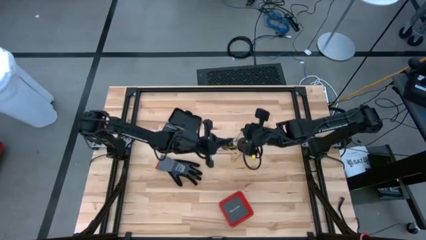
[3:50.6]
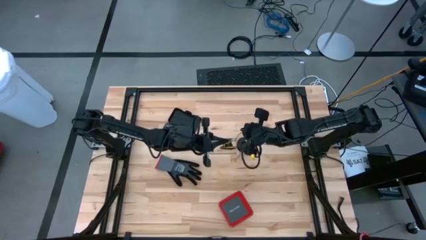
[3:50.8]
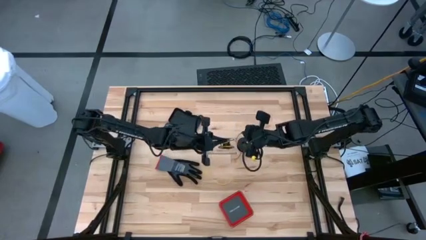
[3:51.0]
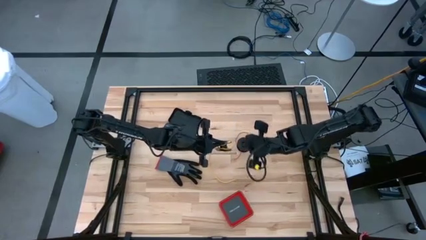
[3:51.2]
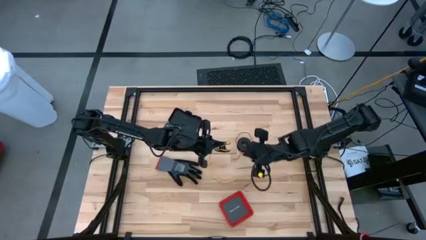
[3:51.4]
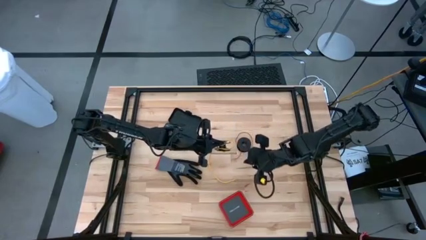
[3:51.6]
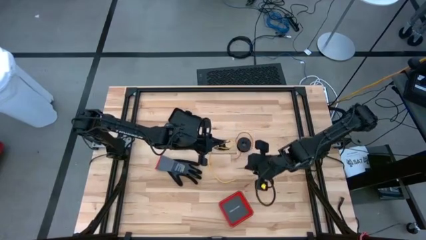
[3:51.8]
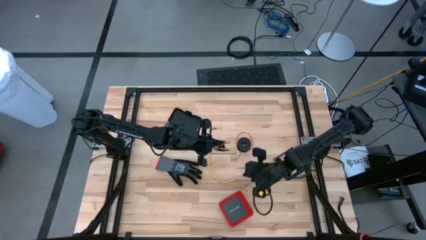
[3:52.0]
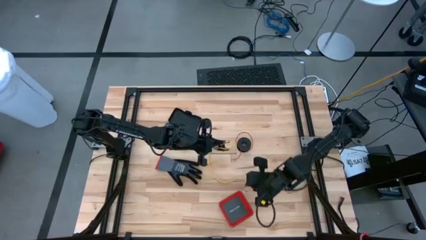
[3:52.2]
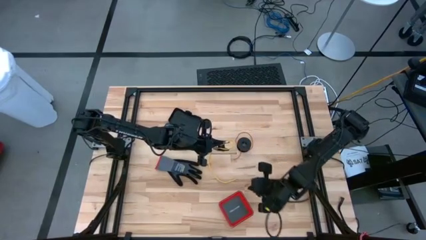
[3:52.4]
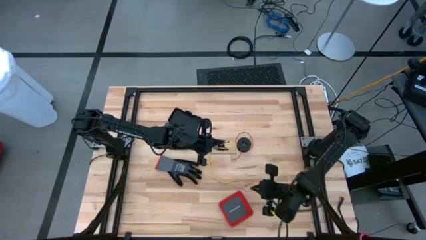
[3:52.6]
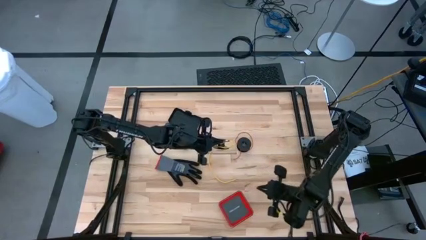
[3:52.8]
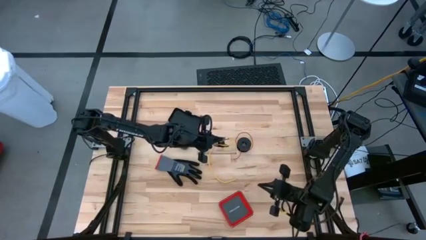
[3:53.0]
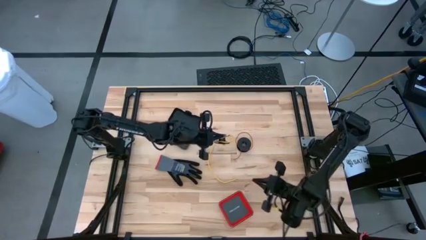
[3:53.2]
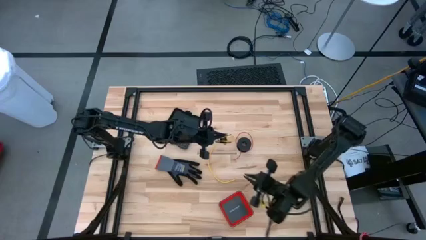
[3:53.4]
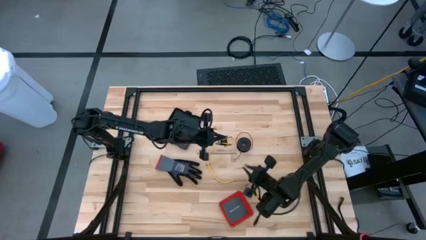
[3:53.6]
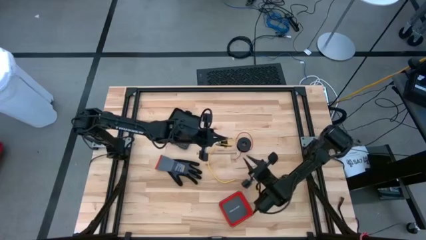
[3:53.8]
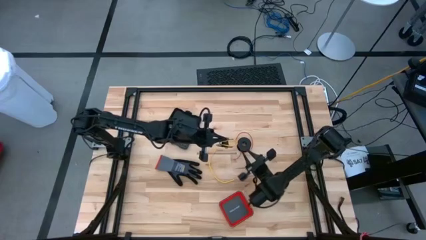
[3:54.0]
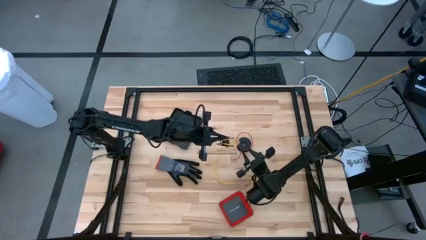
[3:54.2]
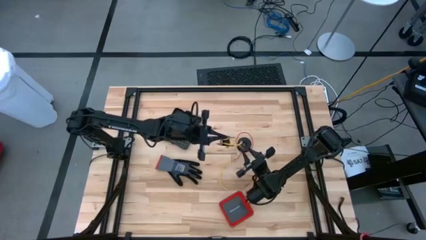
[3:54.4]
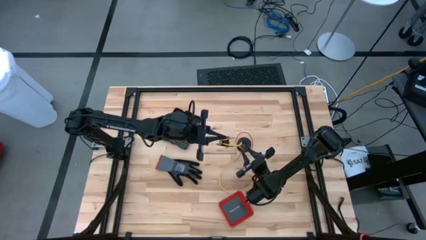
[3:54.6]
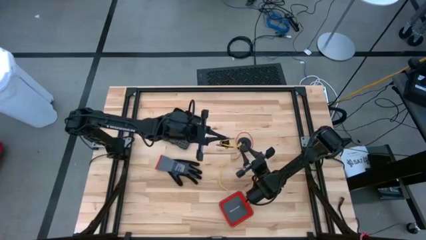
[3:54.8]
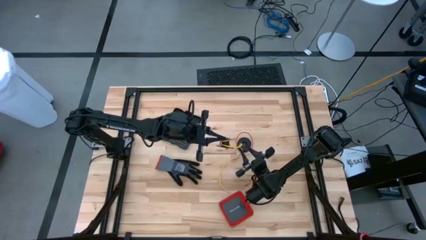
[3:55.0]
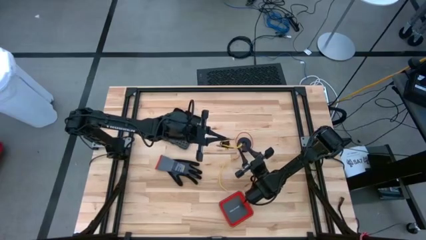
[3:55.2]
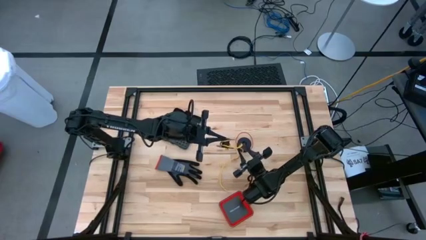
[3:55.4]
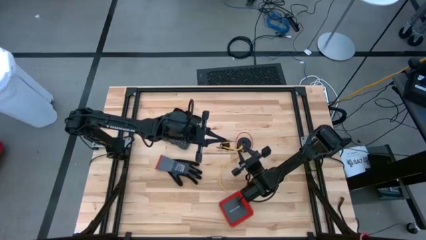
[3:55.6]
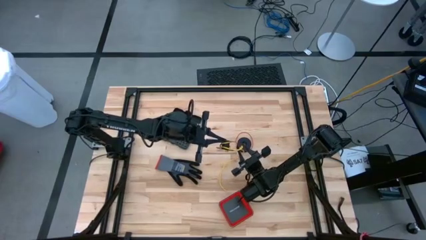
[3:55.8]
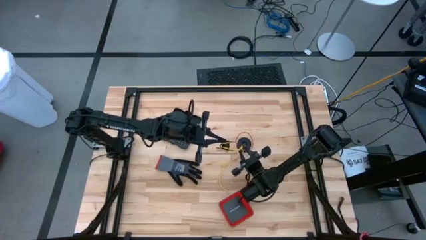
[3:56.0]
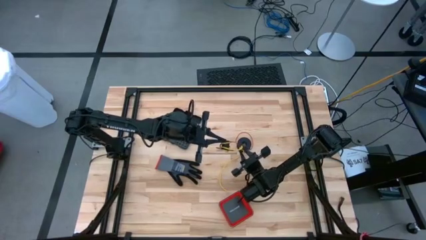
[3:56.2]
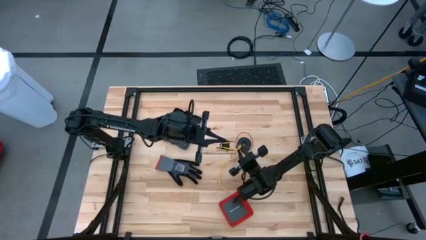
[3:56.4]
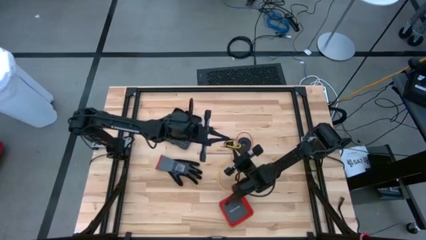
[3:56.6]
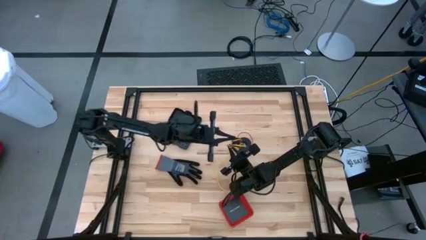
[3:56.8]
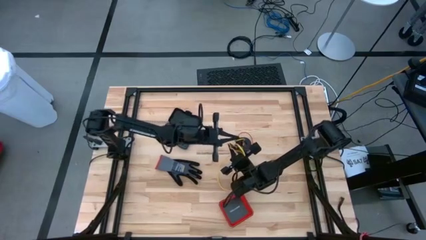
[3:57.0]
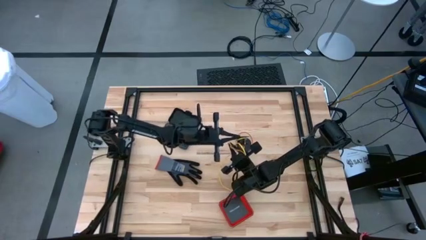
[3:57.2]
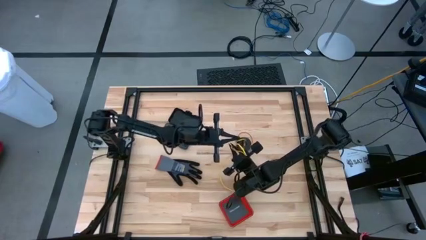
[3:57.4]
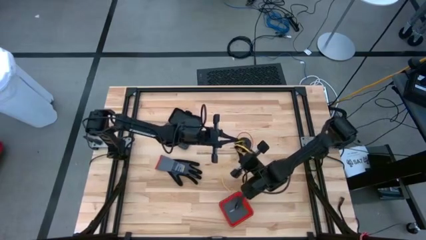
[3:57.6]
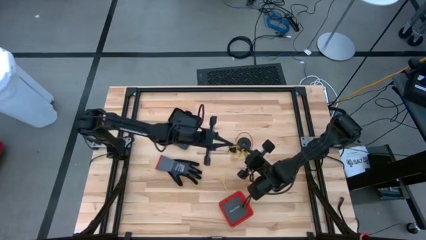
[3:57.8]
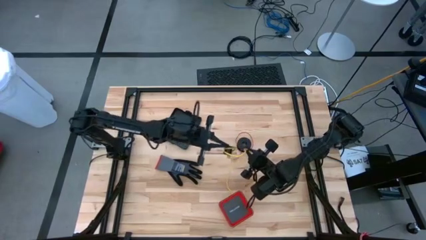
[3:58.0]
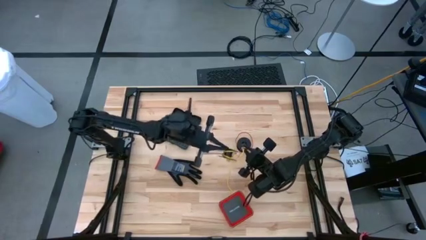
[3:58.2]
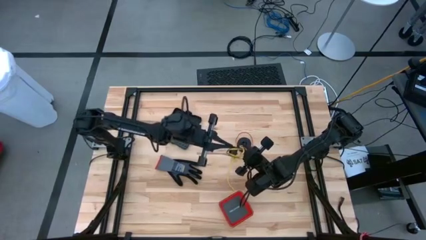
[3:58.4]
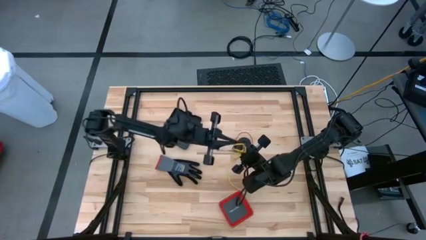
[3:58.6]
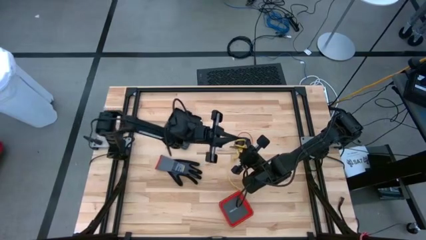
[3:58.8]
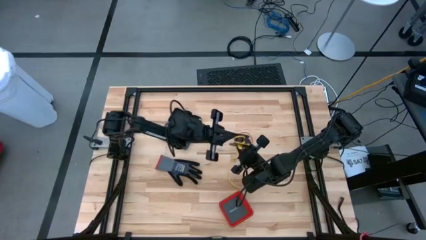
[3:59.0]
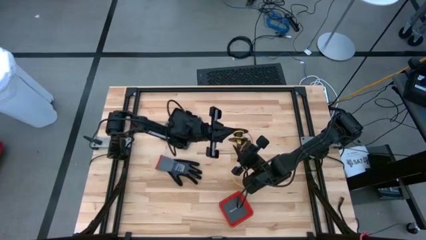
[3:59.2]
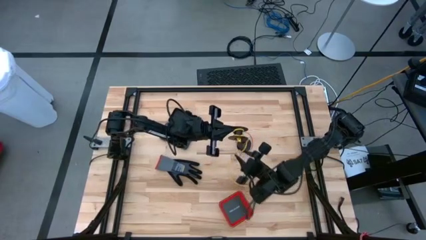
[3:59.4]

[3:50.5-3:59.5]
Task: Coil cords
Coil the yellow wire onto the spool
